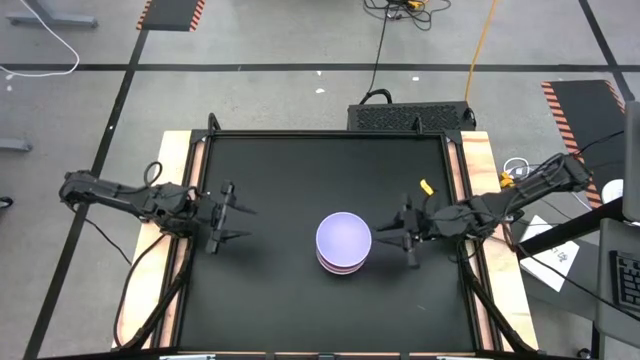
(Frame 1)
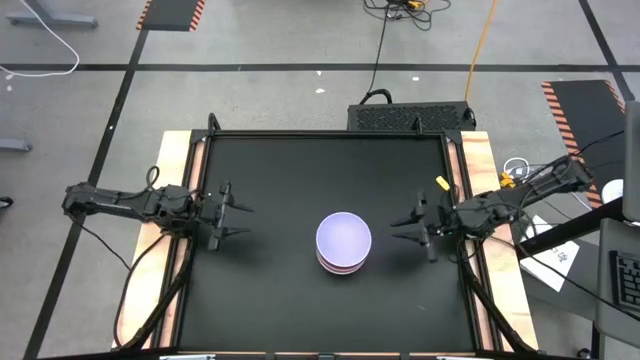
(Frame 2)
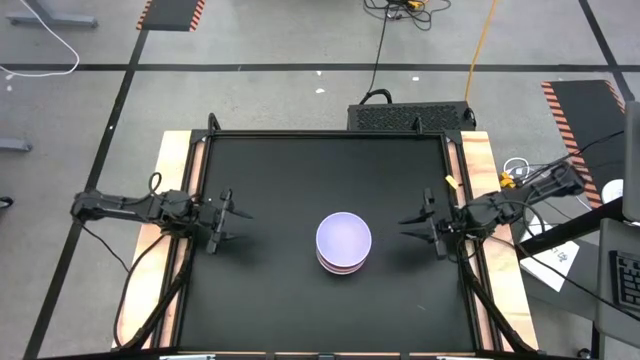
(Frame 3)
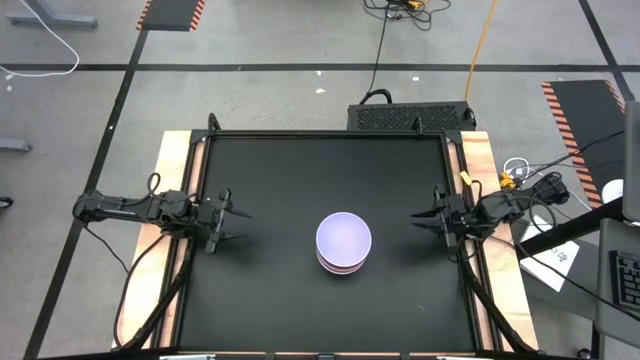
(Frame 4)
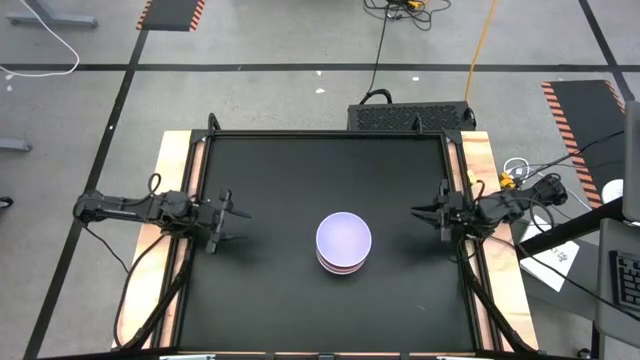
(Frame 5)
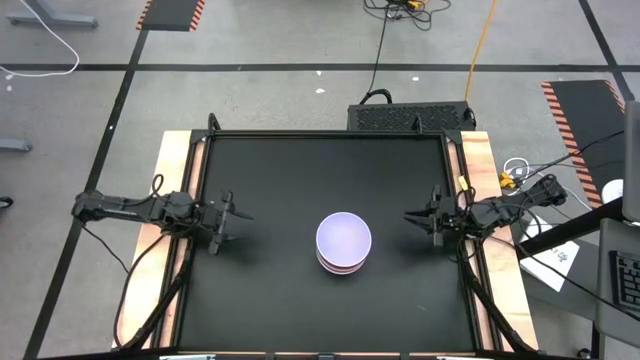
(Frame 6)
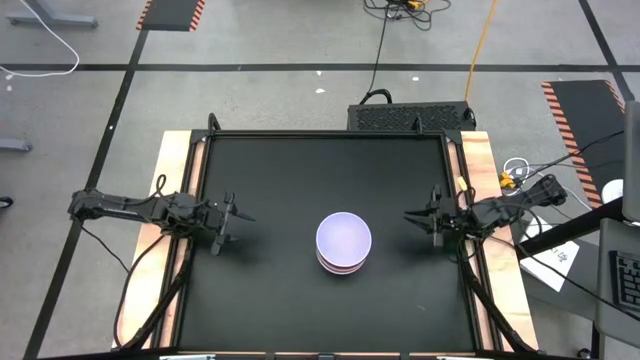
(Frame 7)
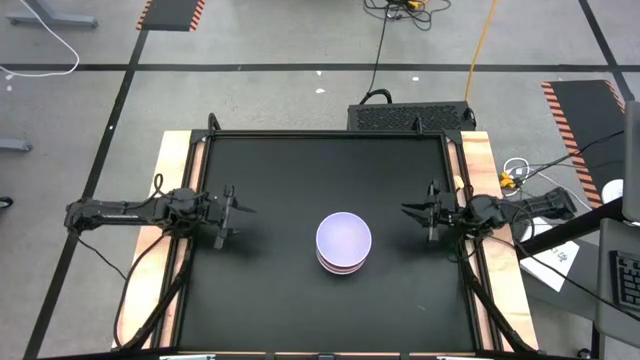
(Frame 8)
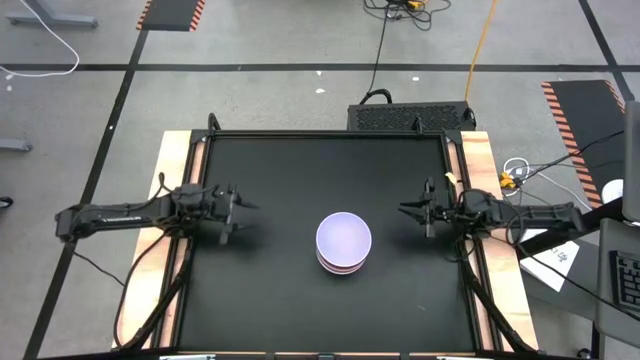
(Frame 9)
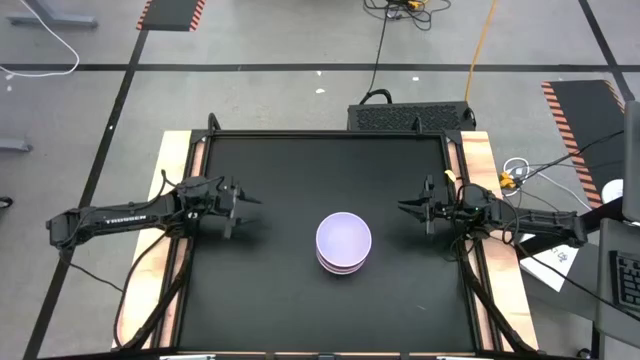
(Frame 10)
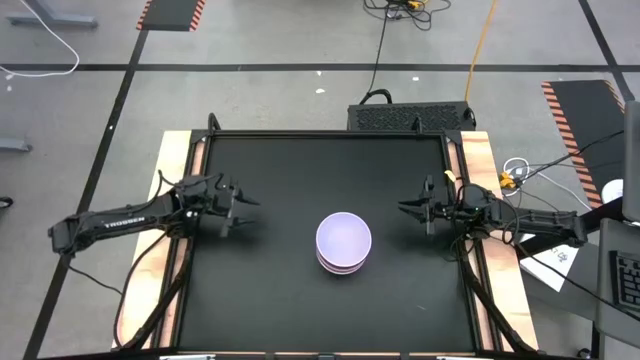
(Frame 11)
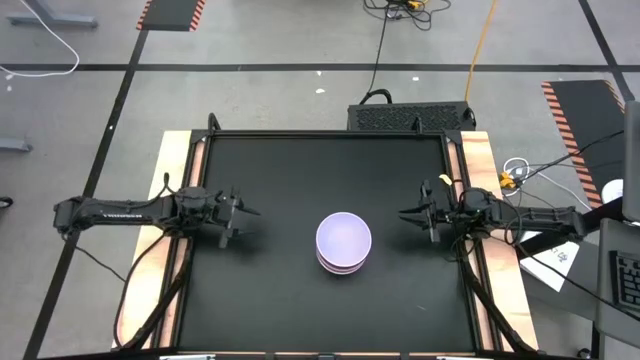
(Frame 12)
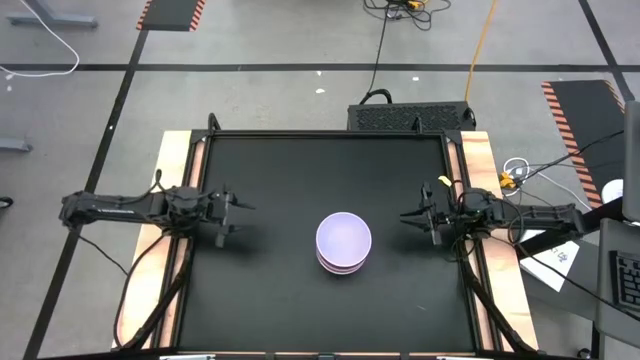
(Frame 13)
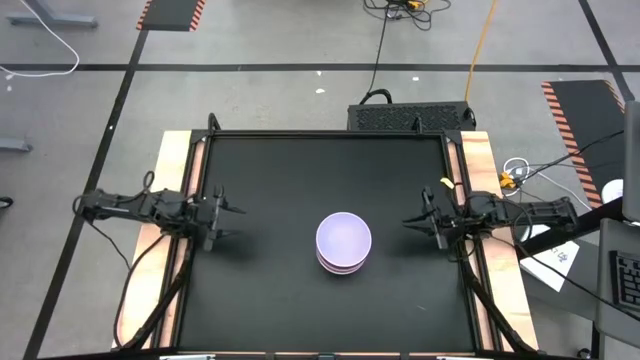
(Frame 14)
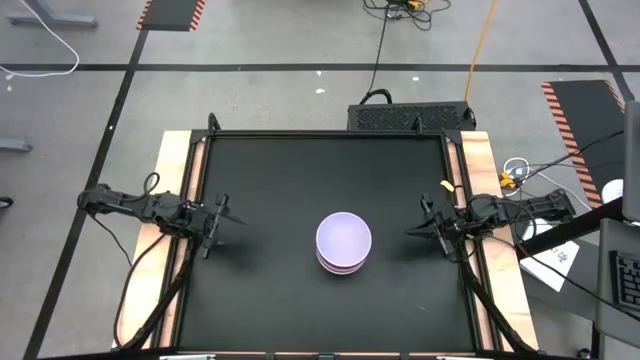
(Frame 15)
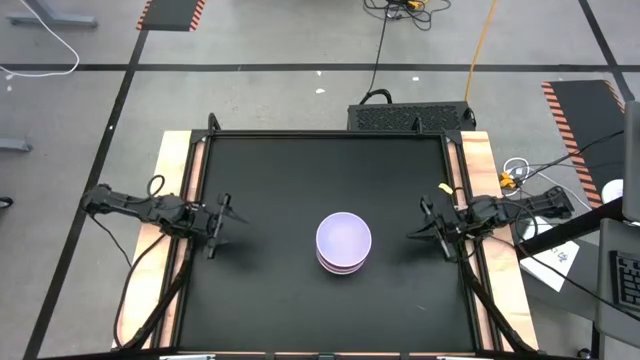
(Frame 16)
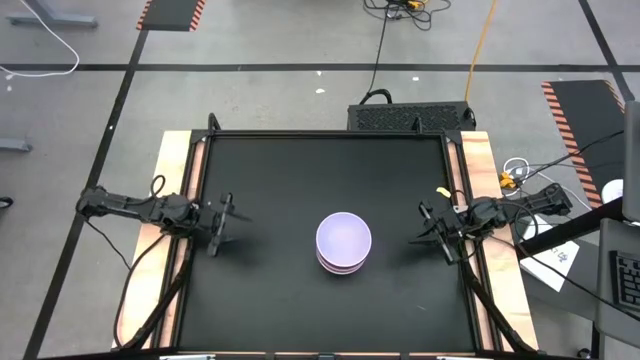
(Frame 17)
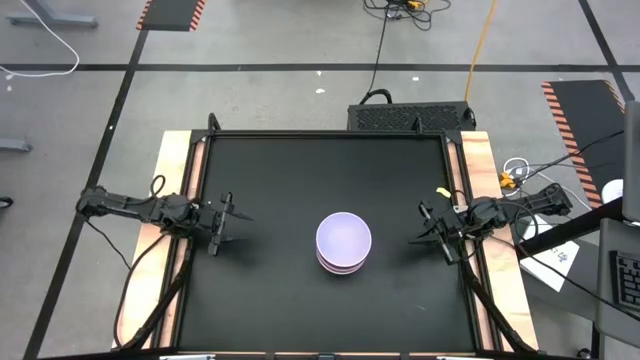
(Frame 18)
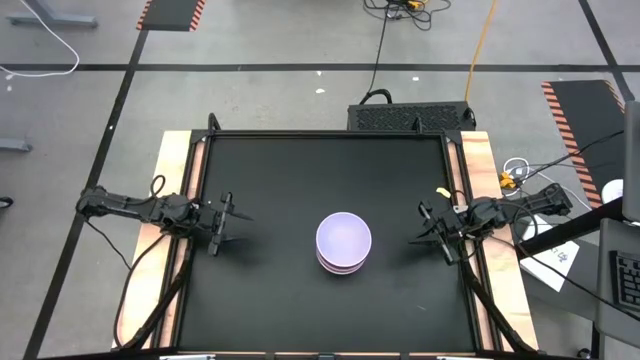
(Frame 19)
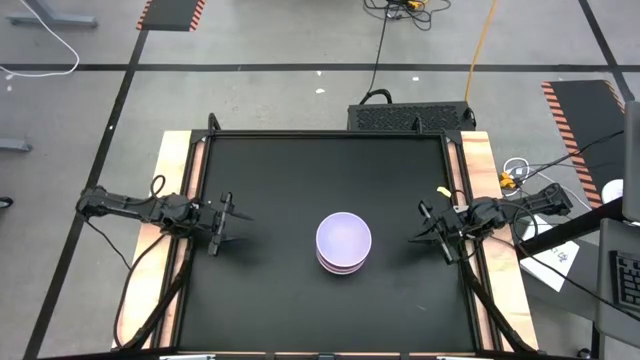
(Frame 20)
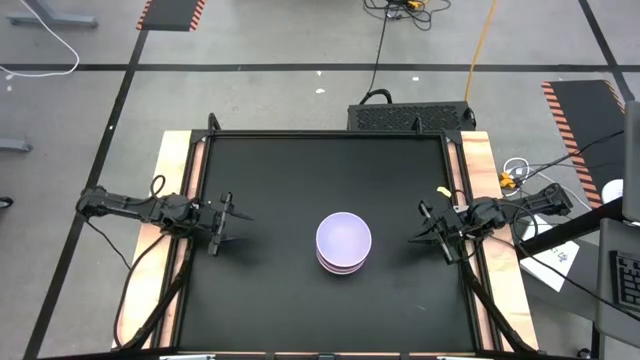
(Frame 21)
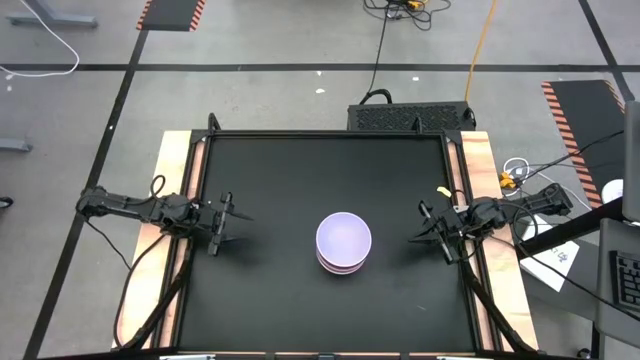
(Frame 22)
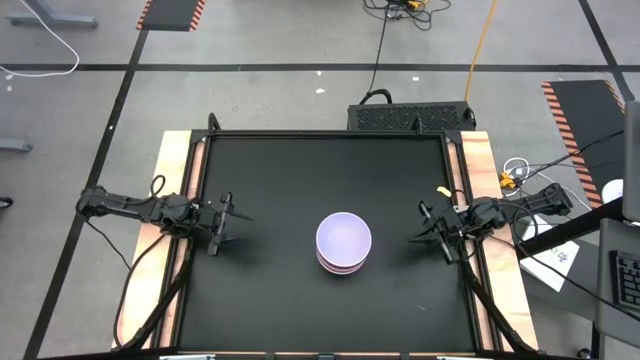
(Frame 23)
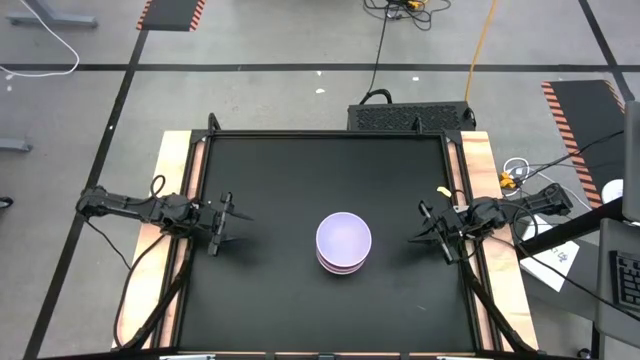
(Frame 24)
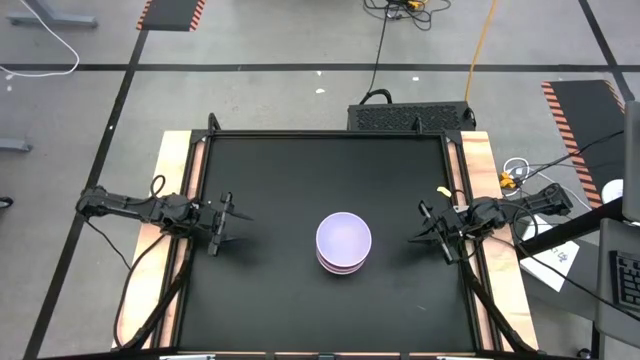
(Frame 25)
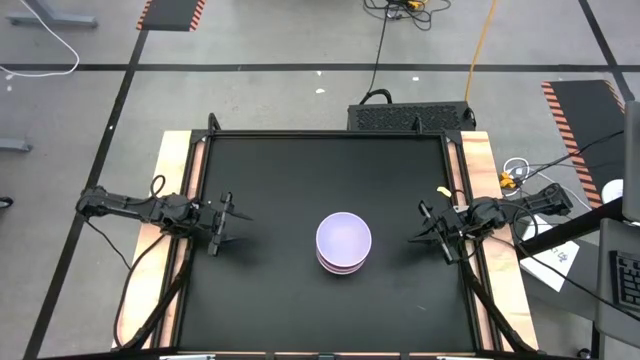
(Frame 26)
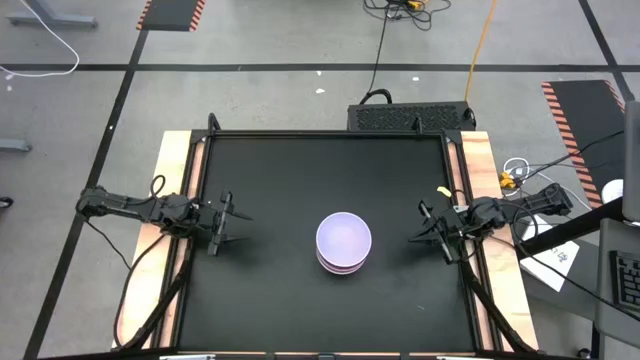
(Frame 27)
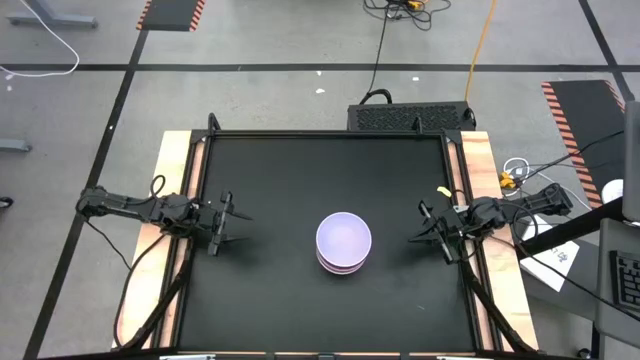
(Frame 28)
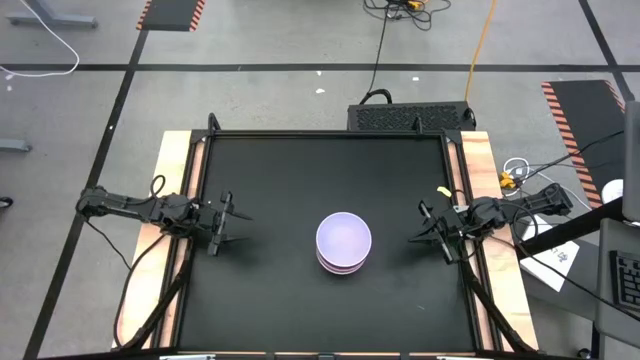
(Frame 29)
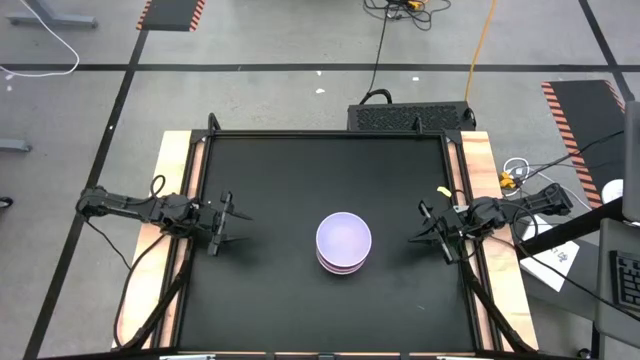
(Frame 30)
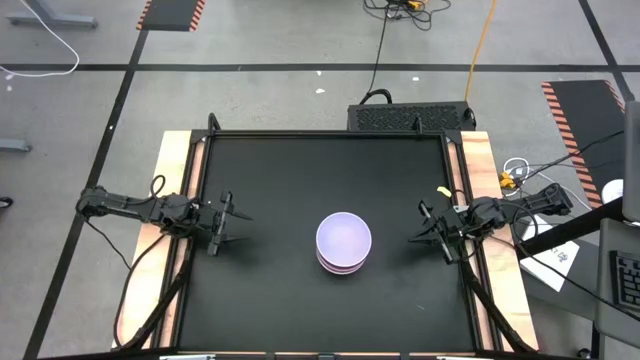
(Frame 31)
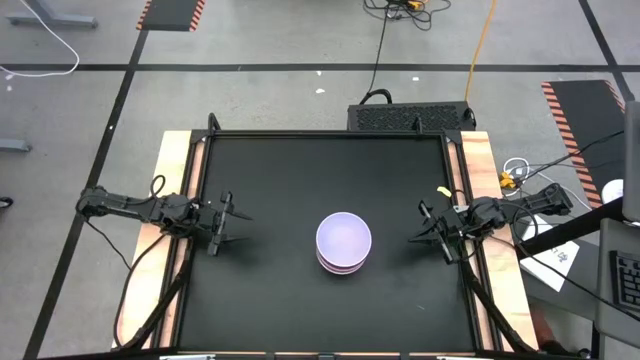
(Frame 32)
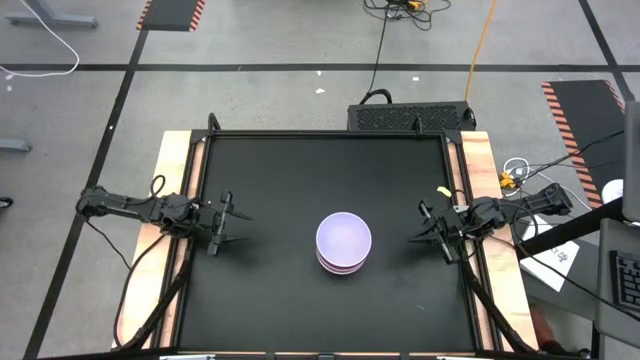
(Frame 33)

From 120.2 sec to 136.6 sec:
Task: Nest bowls inside each other
Return to Home Position

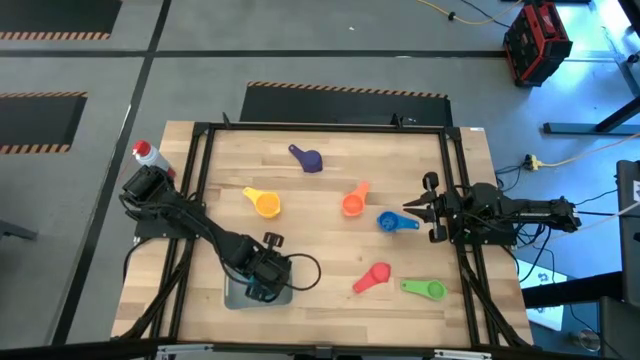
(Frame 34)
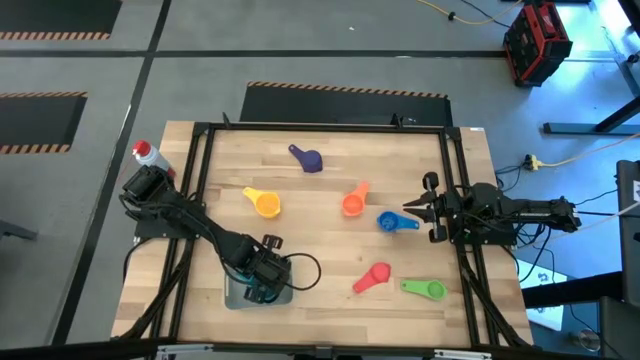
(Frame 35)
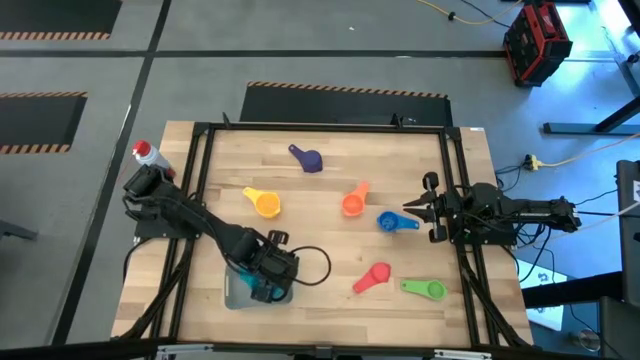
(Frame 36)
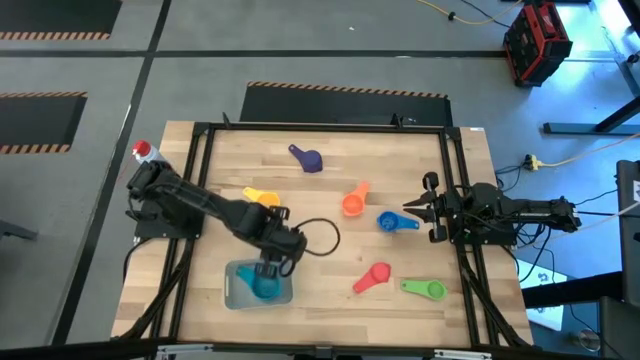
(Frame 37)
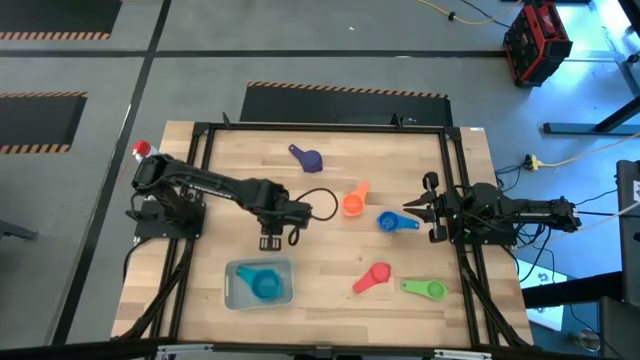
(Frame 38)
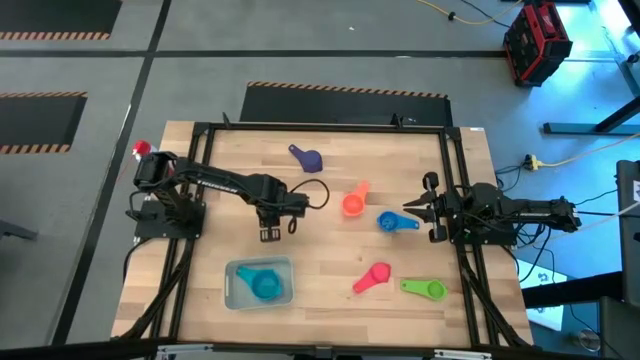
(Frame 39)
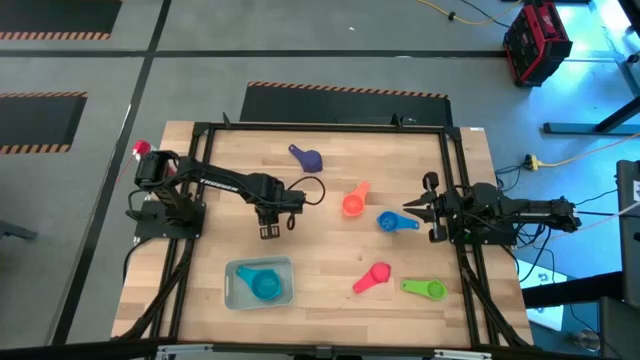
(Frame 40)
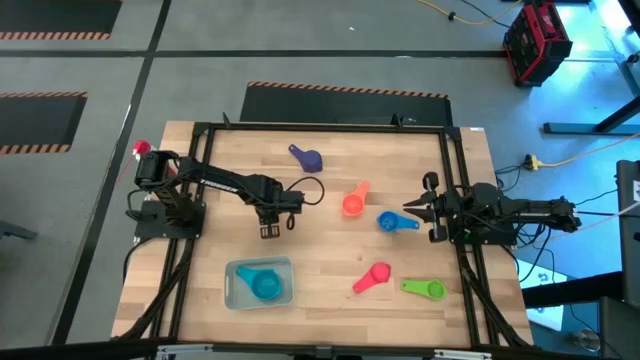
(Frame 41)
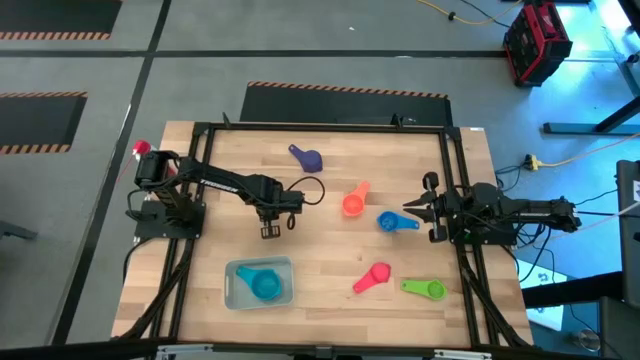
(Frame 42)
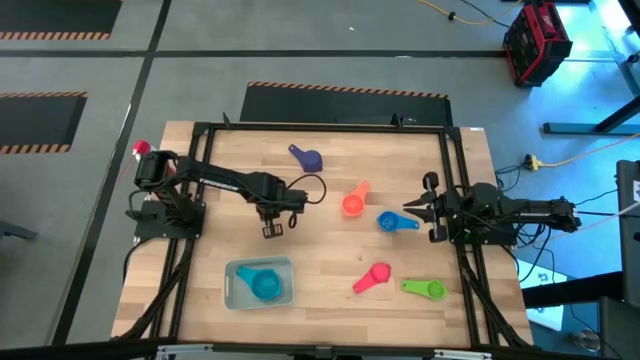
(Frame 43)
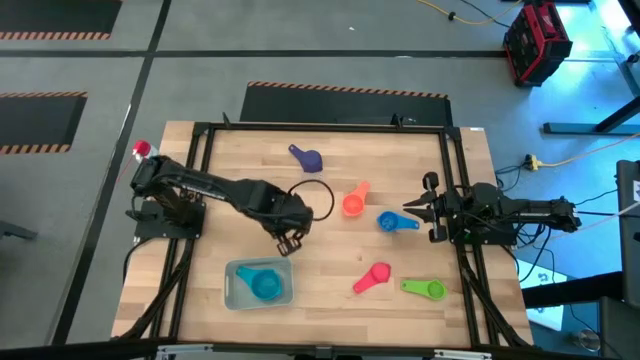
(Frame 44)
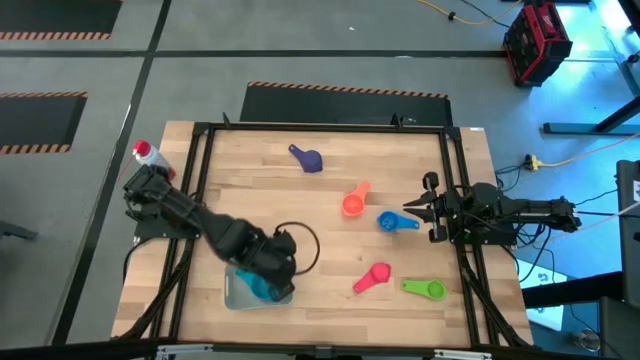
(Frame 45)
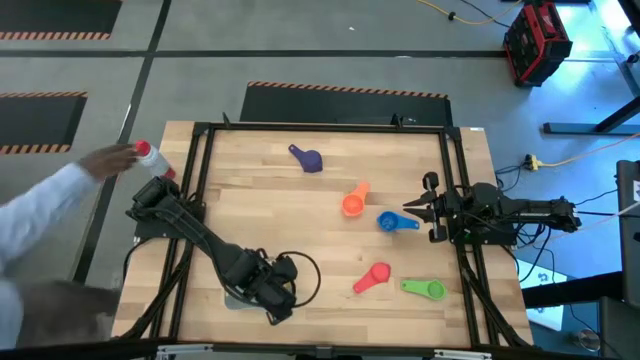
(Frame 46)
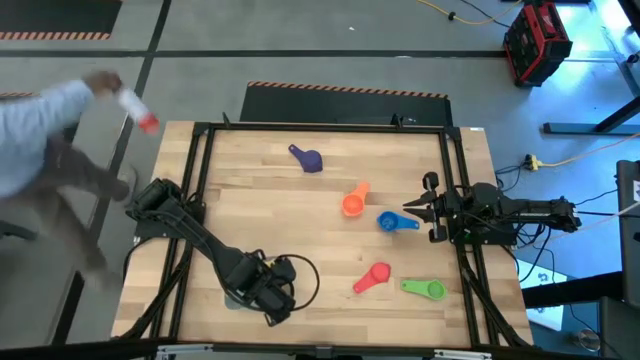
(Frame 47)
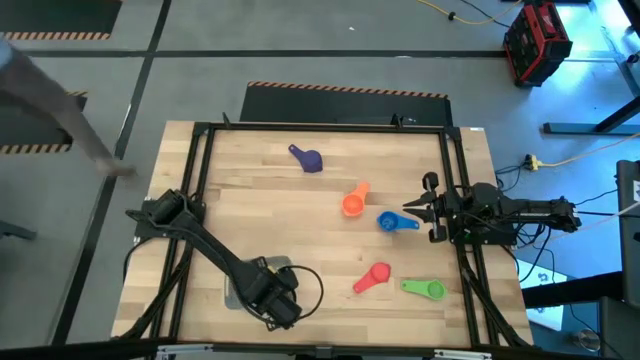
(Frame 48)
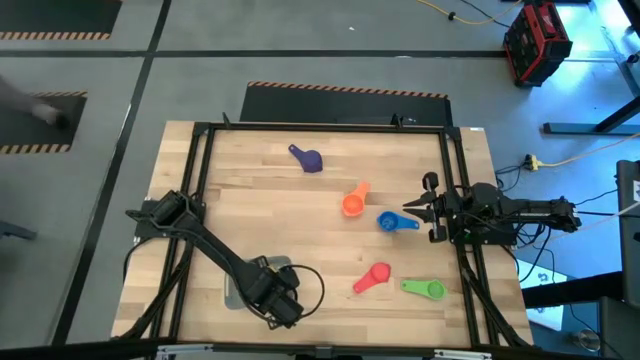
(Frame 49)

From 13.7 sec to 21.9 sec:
Task: Nest measuring cups in basket
Stack the yellow measuring cup on top of the light blue measuring cup in the gray bin
